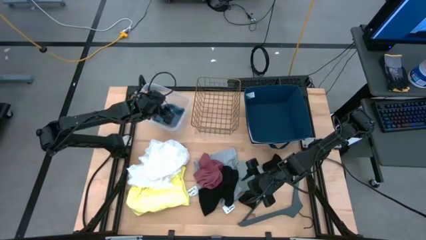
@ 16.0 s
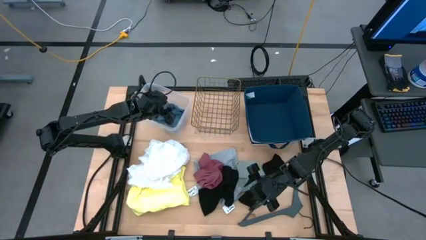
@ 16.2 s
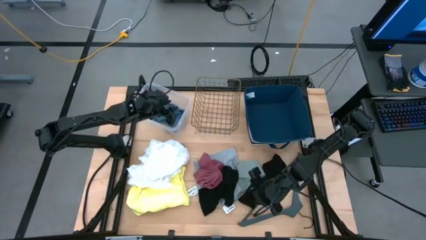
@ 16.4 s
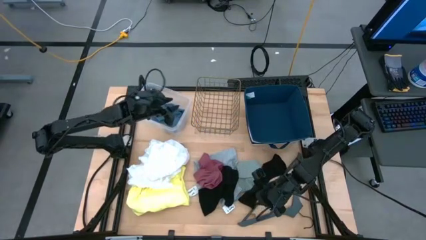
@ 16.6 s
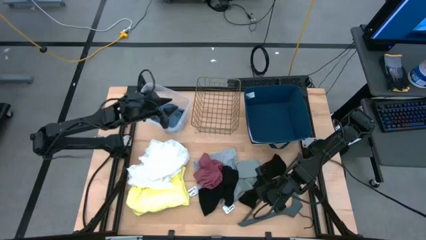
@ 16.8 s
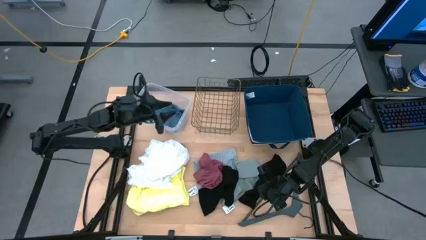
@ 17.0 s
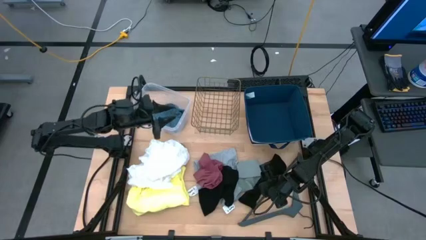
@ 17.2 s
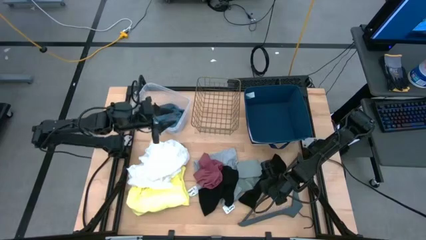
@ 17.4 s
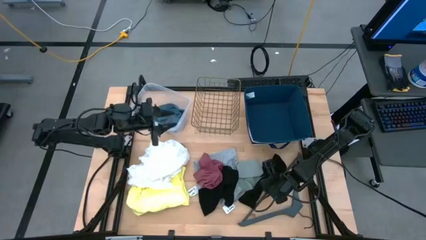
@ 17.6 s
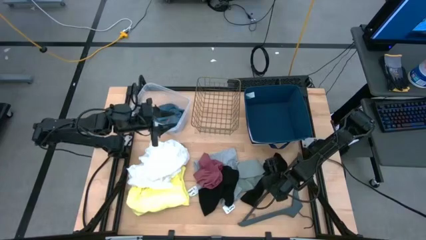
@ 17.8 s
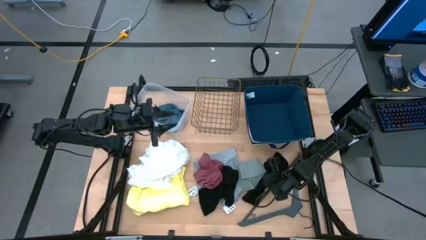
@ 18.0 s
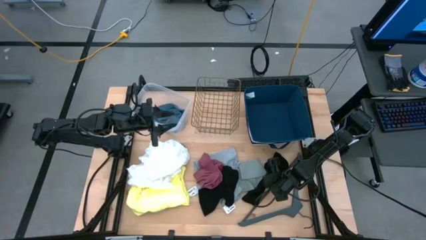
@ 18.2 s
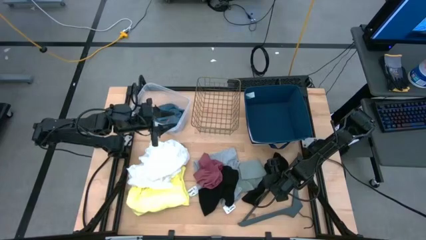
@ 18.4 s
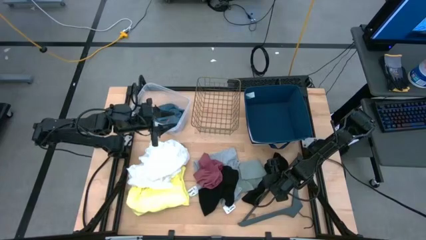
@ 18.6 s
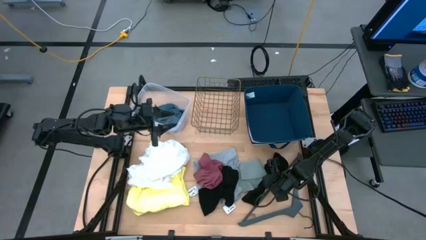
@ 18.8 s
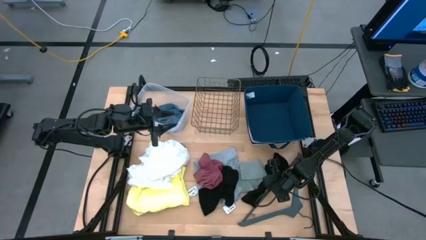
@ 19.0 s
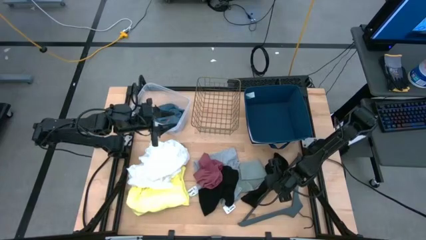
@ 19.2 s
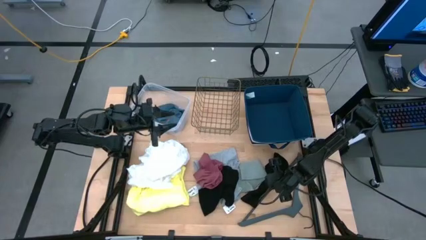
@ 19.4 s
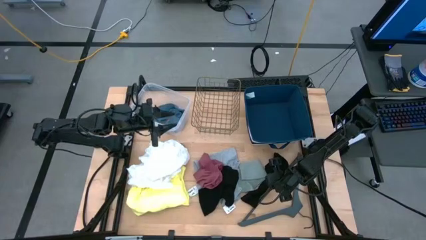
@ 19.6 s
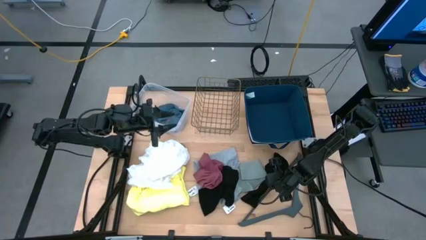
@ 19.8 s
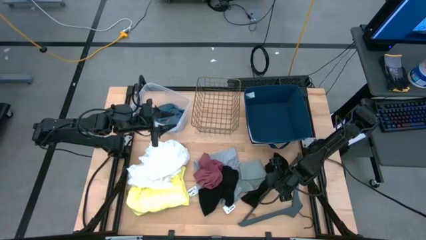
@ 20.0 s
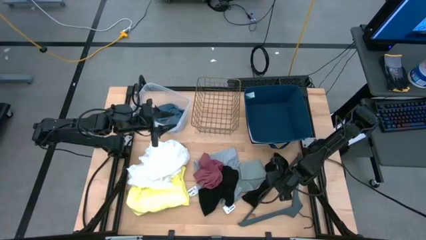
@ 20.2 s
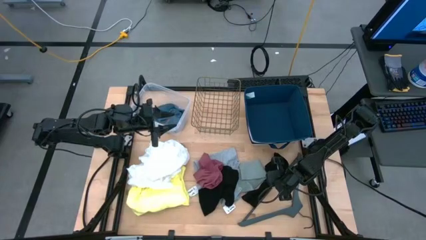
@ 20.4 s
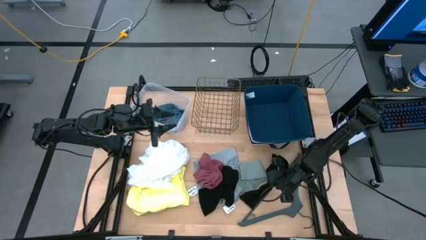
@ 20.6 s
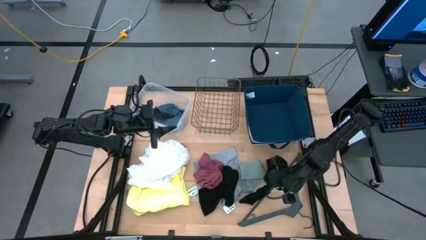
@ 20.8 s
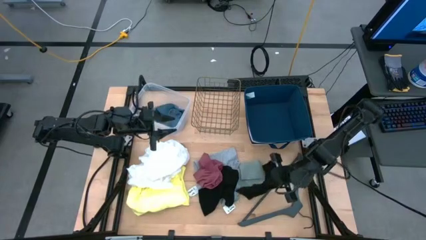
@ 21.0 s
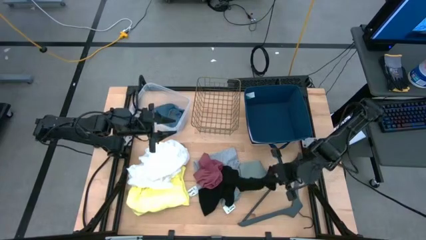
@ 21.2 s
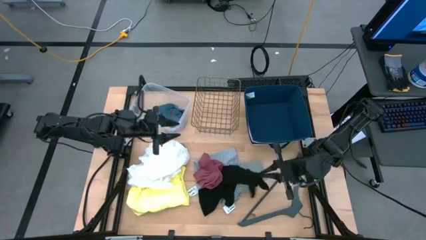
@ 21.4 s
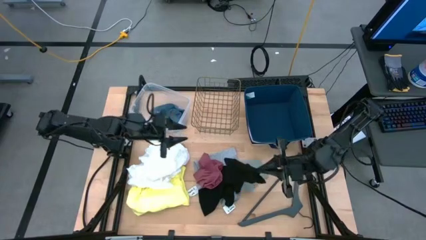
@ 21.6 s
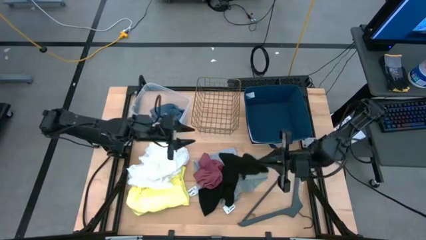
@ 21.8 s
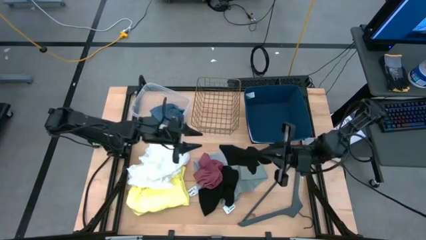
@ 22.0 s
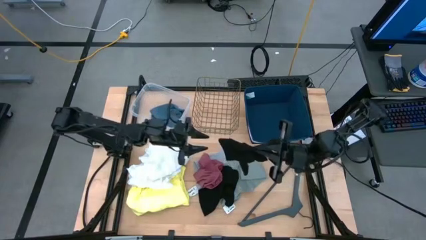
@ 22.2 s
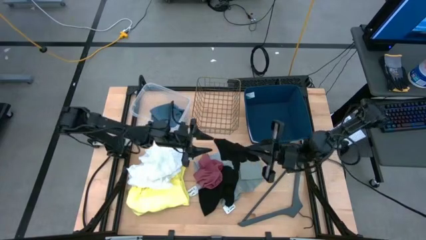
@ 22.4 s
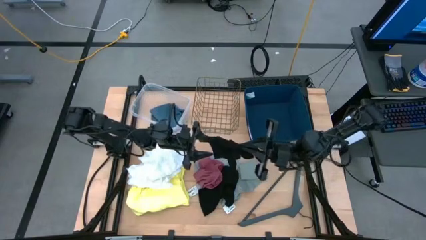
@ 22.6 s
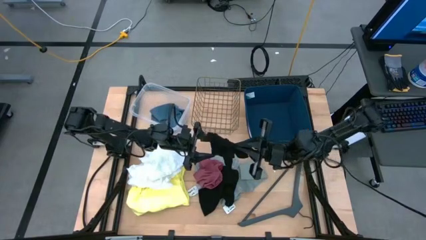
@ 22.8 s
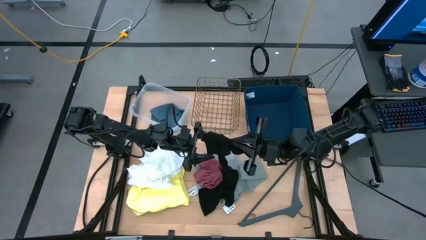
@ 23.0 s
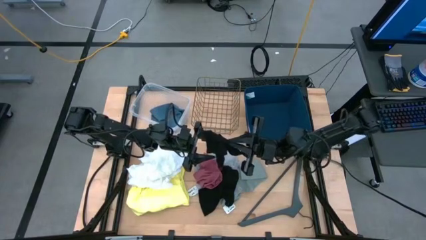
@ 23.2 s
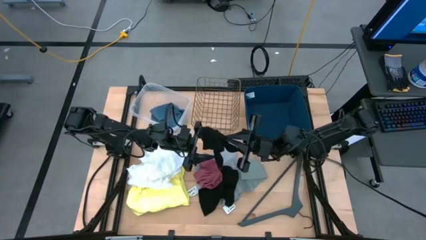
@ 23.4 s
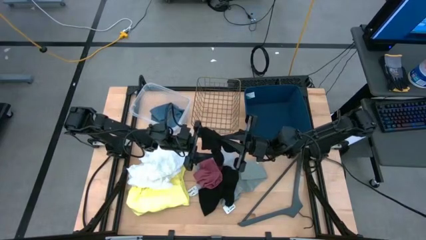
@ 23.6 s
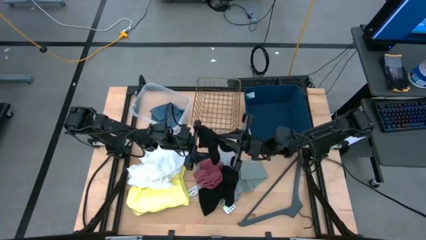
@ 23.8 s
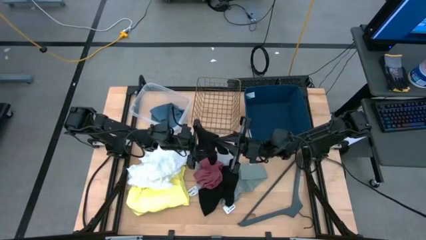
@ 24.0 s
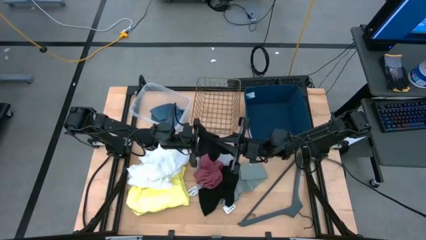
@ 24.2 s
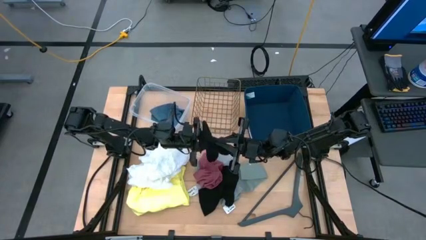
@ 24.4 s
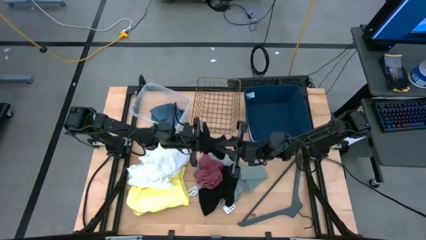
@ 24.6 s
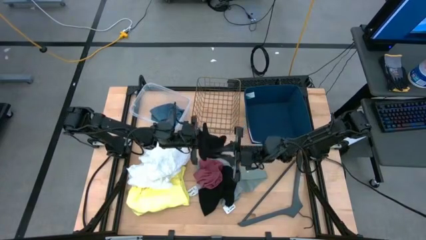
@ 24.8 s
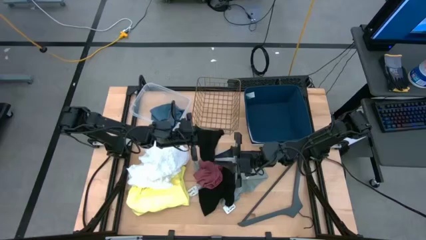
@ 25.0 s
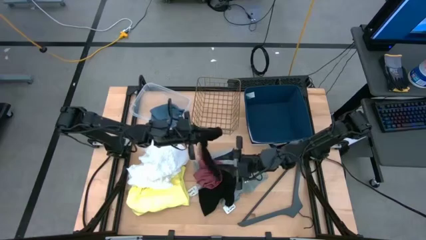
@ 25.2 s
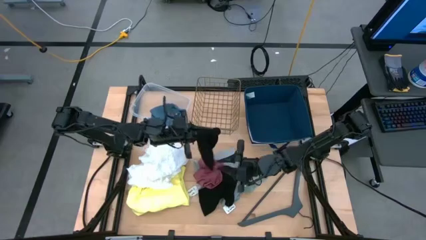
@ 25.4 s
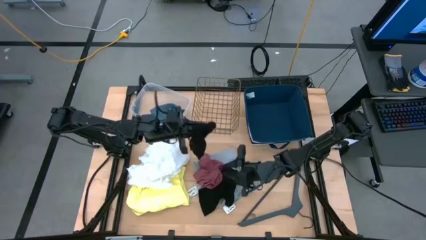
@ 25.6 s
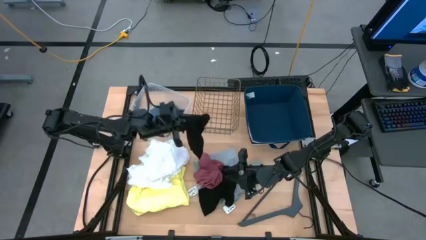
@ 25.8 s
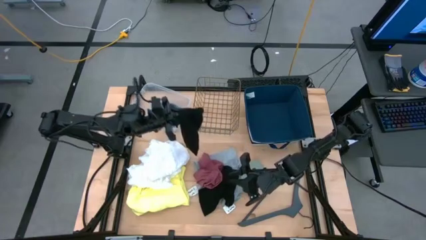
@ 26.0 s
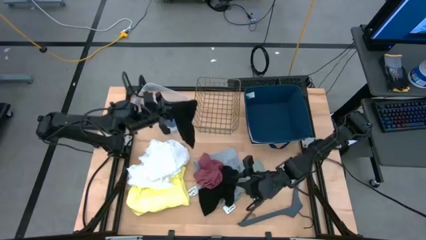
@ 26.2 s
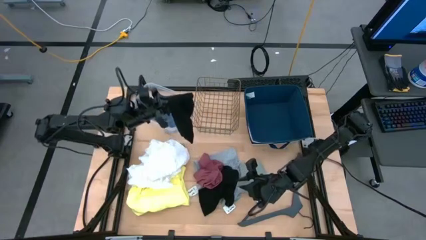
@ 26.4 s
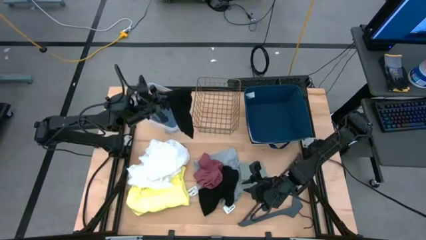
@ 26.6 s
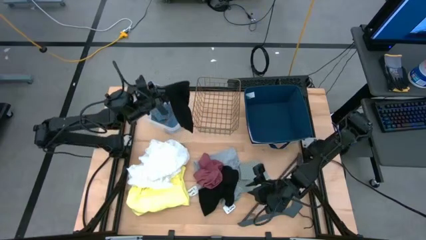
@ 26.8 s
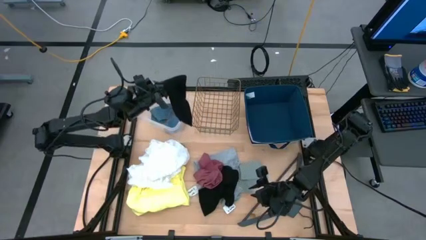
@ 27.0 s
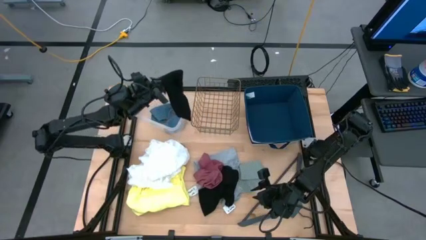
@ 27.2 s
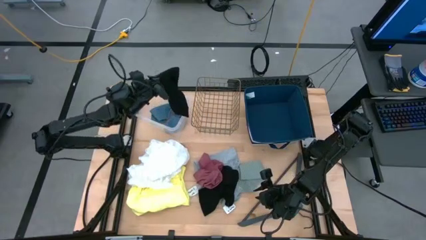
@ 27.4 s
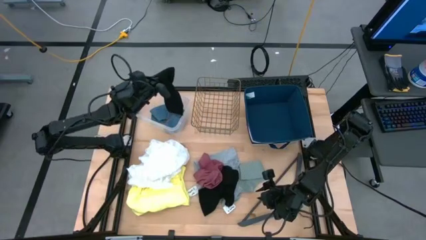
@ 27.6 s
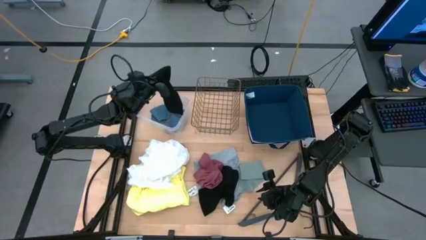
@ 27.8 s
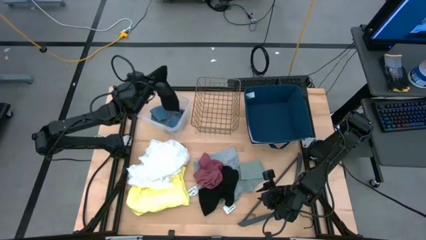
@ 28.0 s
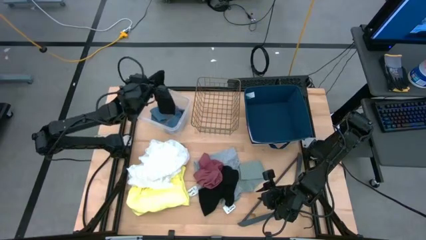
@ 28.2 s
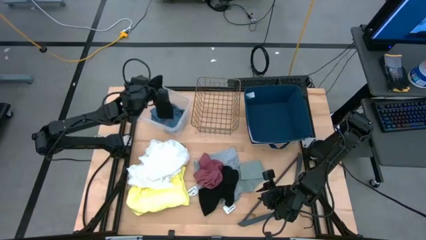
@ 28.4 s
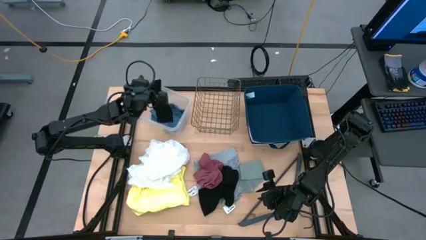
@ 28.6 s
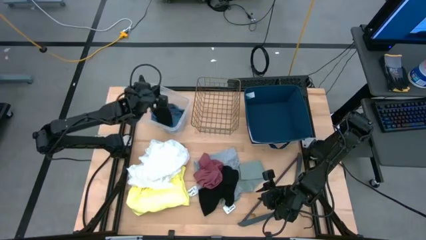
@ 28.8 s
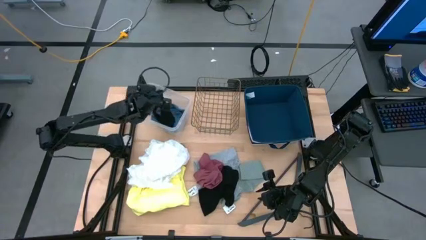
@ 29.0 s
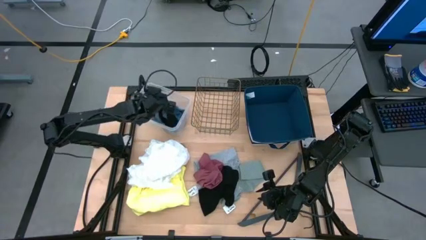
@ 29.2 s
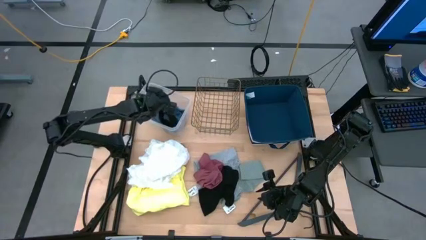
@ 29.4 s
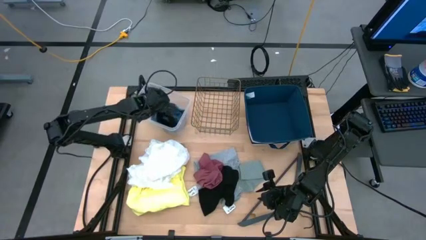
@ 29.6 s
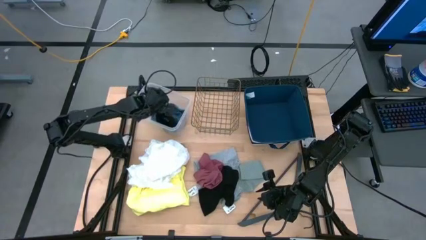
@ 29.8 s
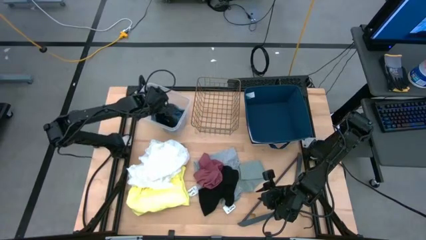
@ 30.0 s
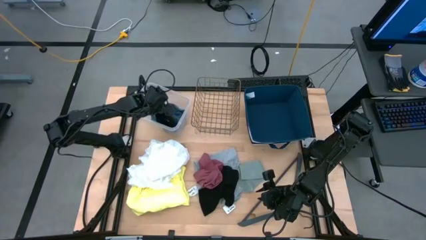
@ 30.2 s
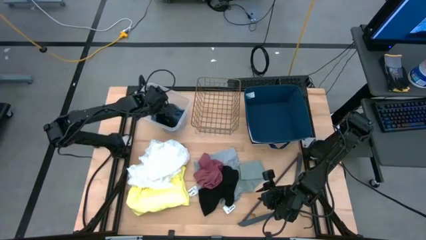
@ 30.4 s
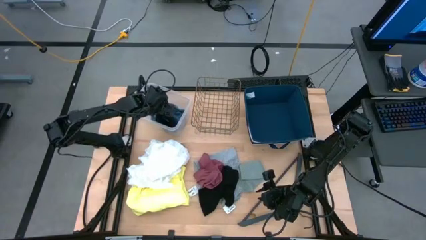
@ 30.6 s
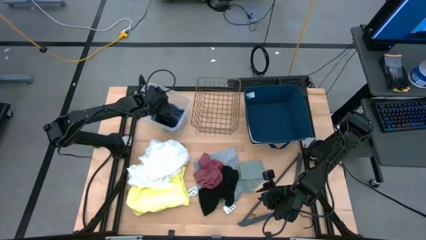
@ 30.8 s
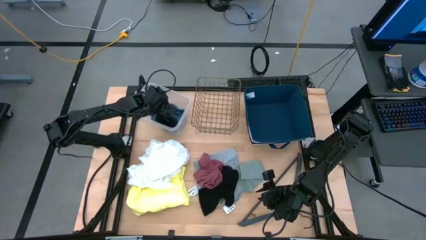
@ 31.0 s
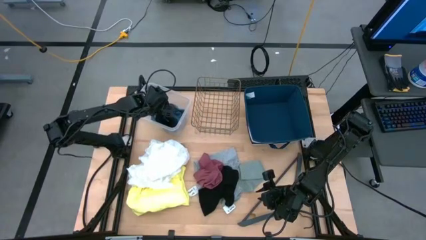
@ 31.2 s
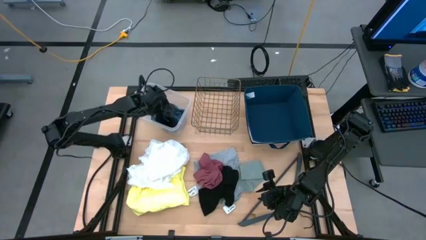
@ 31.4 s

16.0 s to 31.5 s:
Task: Pick & Place Cloths
Put the black sock into the transparent bin
